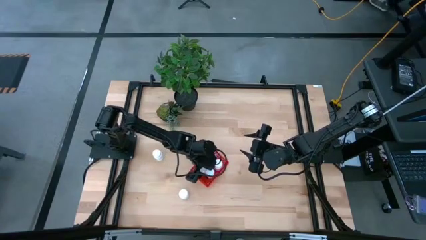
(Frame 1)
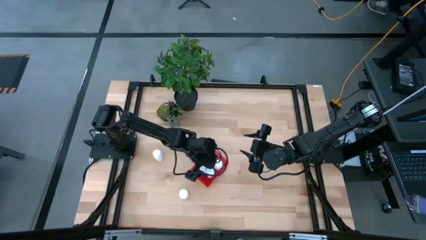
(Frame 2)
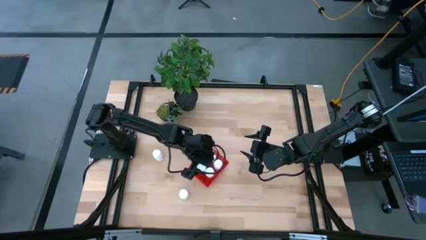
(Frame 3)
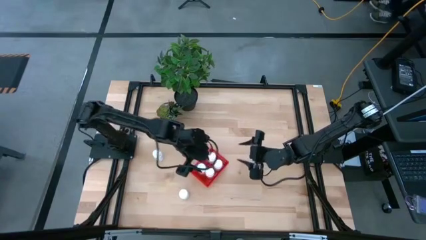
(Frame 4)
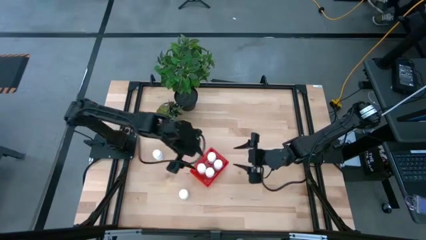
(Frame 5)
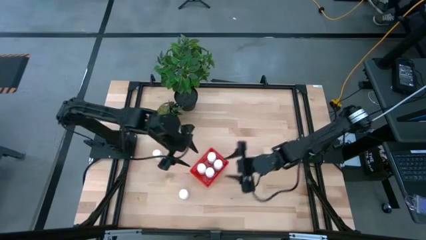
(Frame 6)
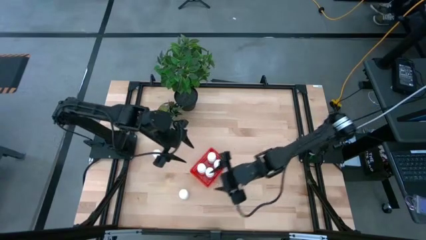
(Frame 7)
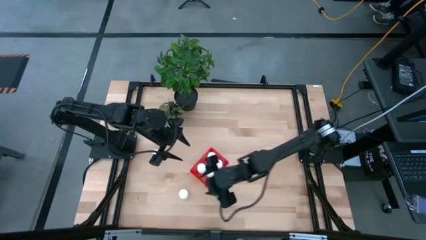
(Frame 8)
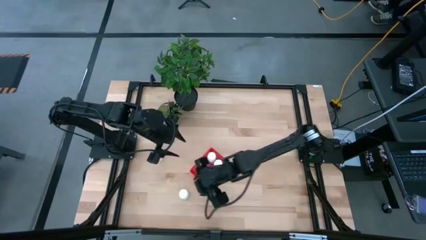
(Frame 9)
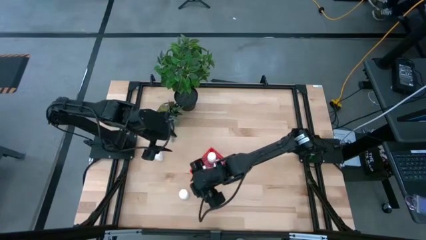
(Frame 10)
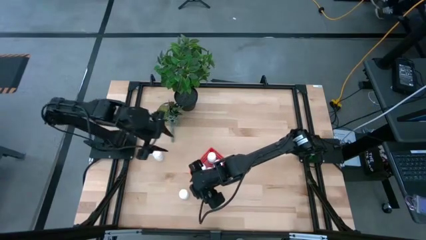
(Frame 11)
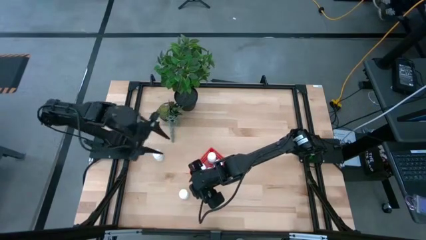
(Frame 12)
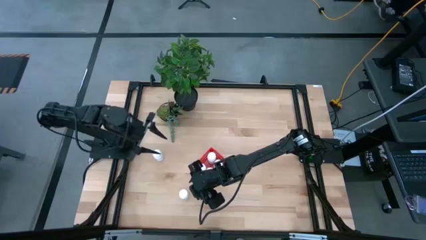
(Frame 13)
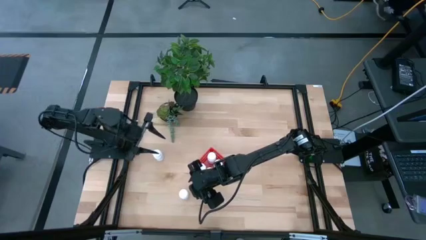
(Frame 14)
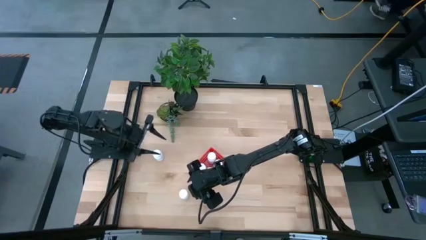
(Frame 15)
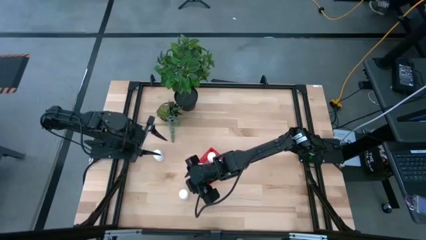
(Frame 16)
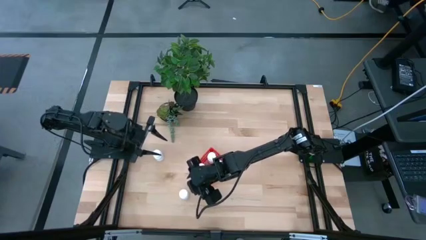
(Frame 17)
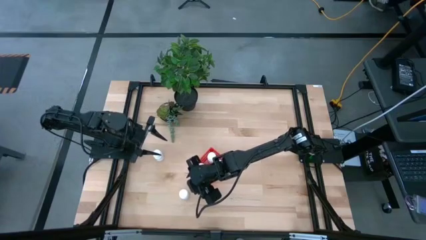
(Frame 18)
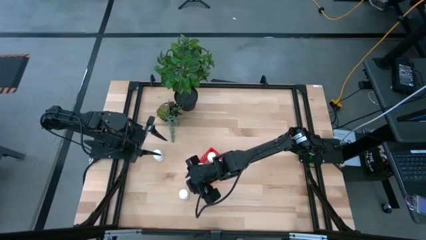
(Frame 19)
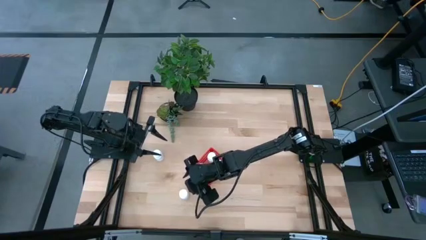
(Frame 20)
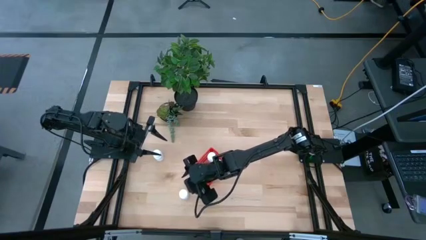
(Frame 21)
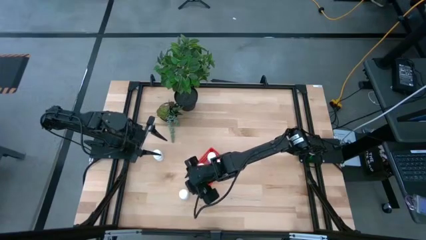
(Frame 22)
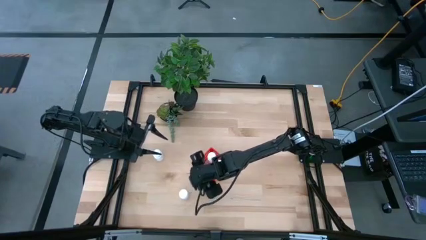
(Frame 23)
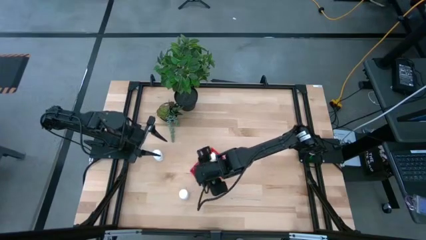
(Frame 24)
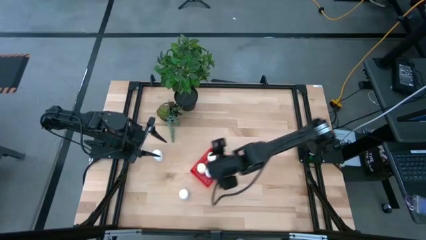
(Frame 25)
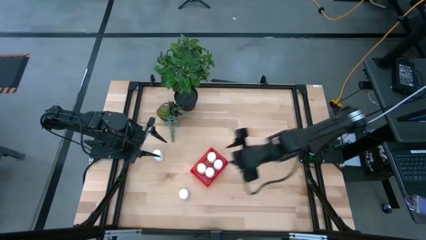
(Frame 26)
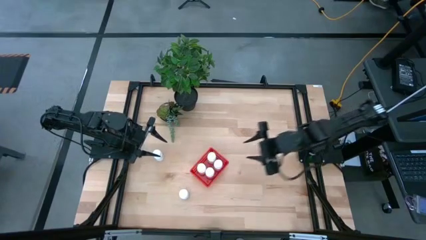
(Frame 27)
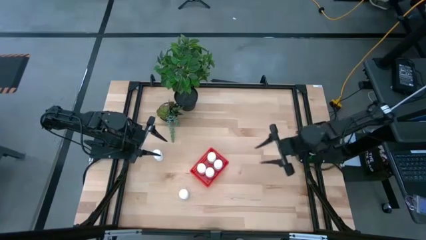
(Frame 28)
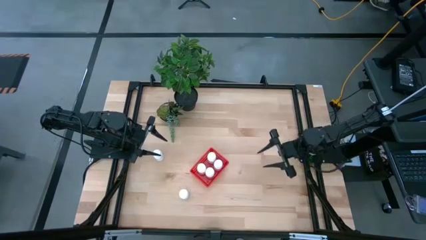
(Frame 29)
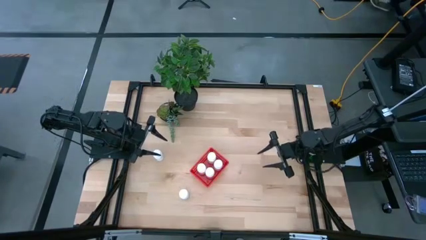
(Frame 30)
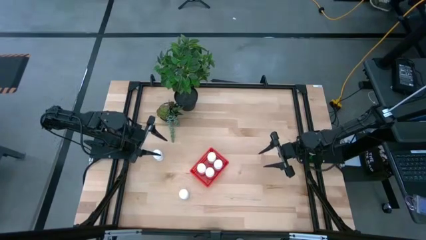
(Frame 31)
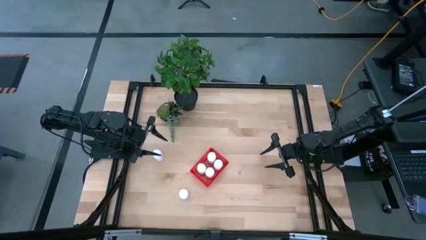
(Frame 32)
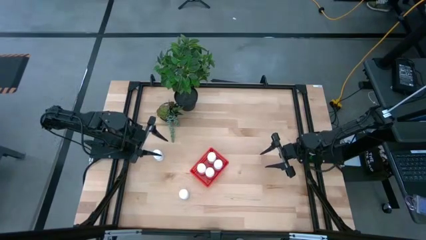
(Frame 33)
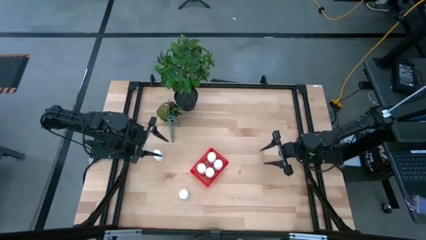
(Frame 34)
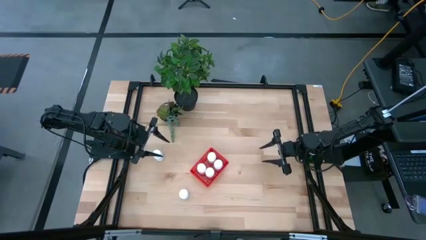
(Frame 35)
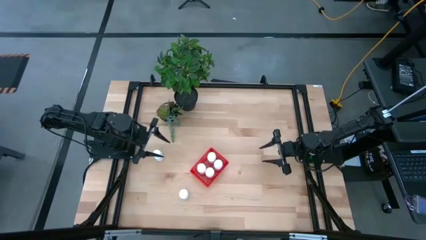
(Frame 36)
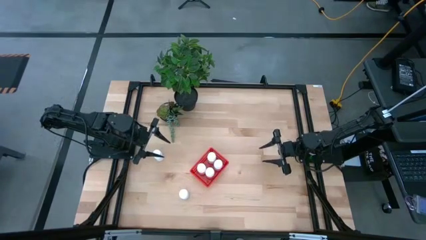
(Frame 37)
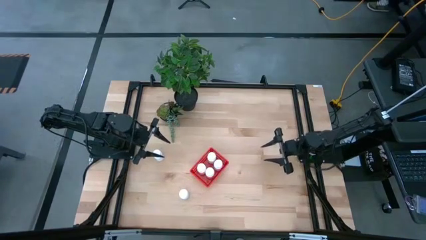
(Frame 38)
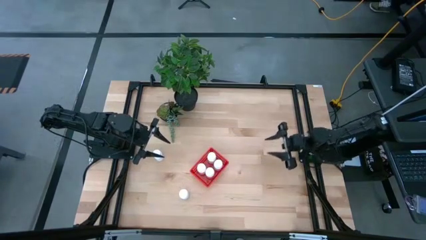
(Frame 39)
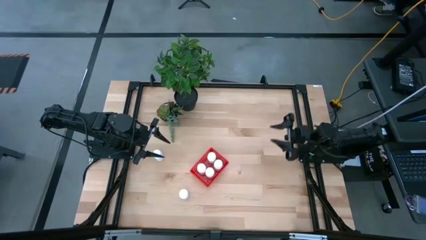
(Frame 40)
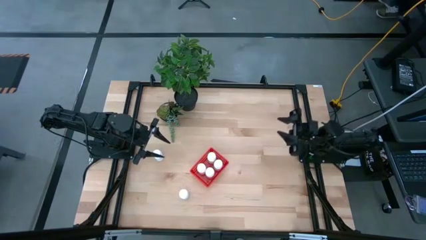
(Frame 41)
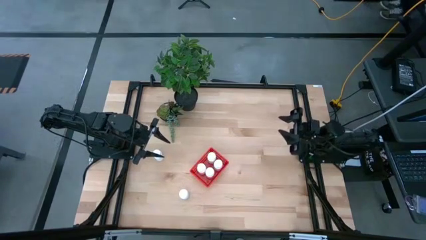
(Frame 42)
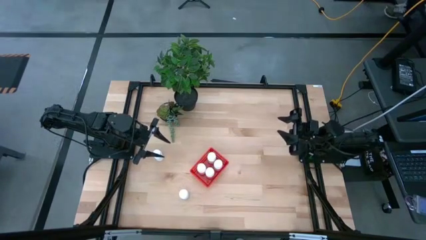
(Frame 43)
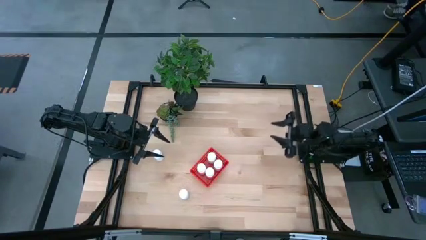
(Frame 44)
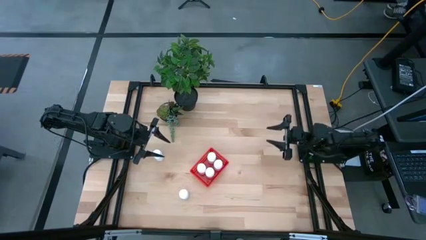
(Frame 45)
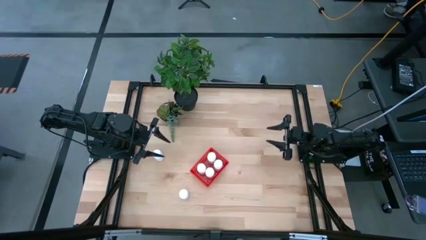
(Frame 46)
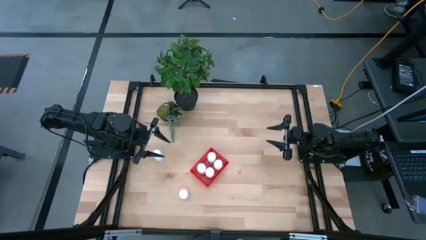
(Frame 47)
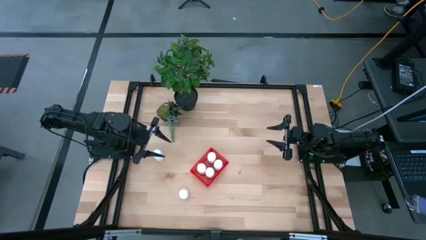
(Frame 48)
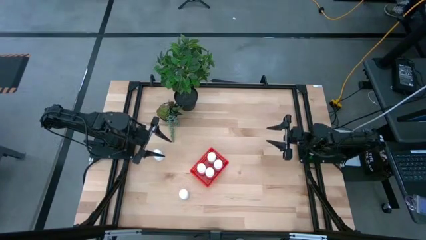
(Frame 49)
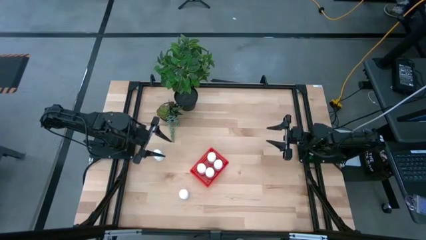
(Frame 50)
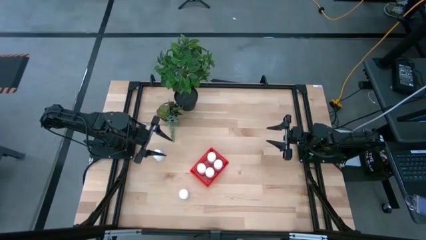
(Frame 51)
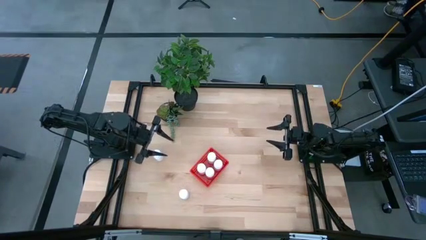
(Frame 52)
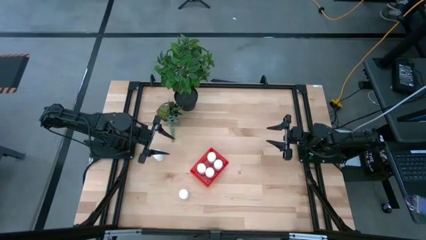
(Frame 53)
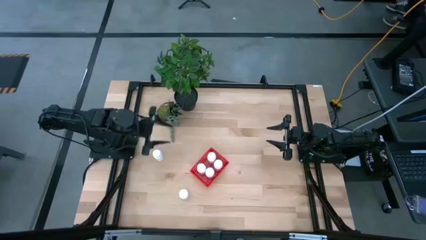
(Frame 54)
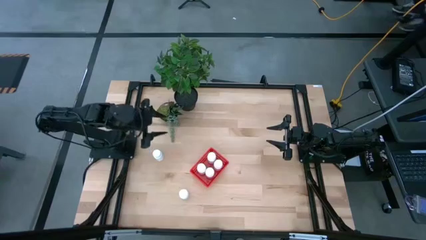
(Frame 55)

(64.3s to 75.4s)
Task: Pick and place pill bottles into a basket
Put the top white medicine bottle into the red bin

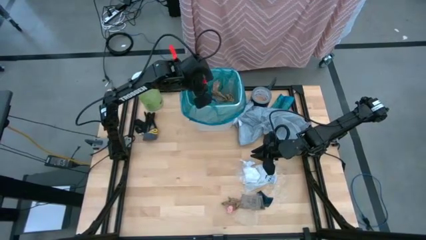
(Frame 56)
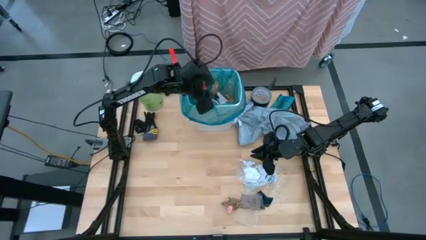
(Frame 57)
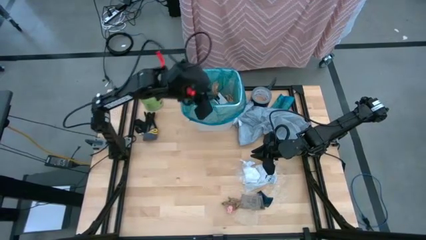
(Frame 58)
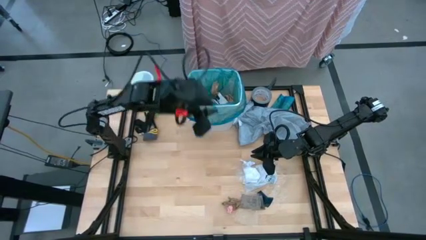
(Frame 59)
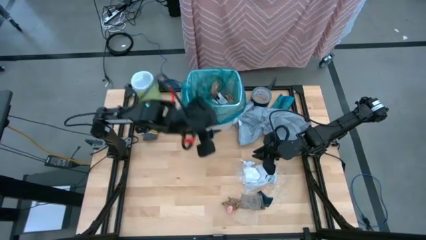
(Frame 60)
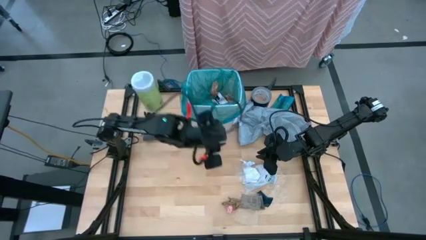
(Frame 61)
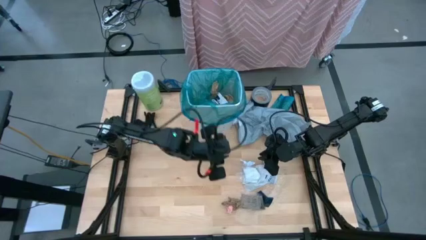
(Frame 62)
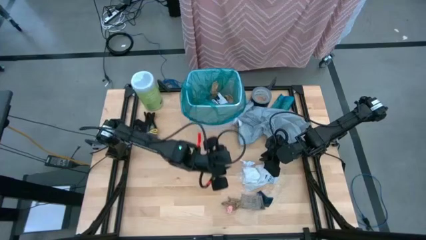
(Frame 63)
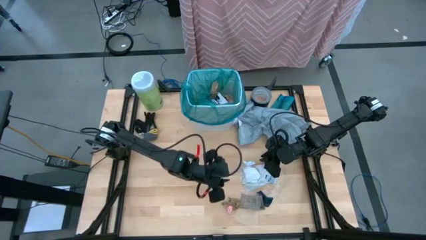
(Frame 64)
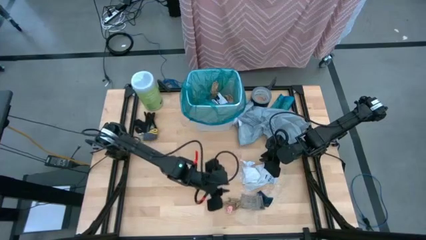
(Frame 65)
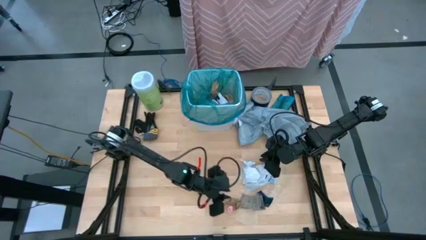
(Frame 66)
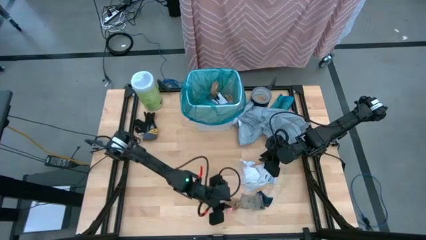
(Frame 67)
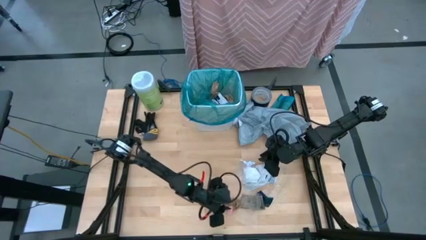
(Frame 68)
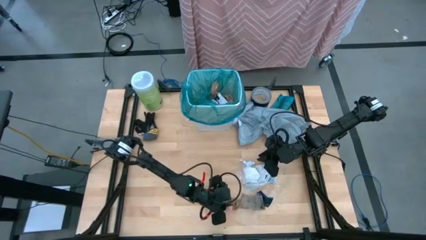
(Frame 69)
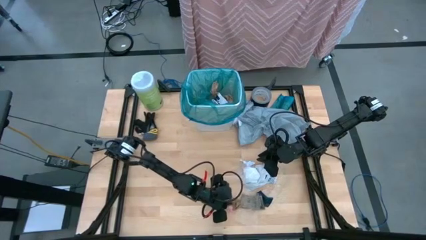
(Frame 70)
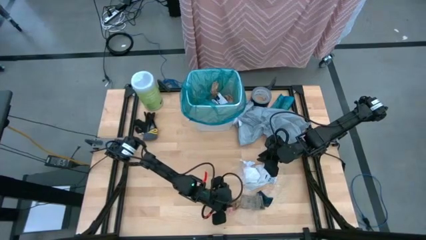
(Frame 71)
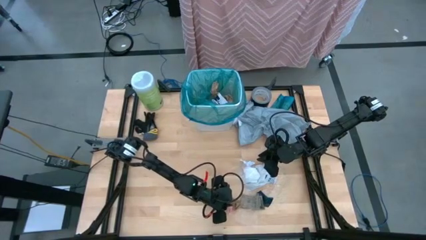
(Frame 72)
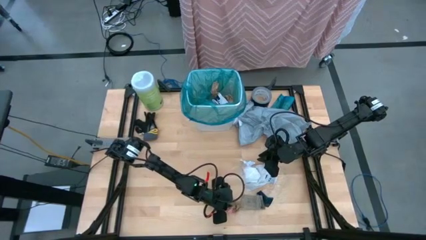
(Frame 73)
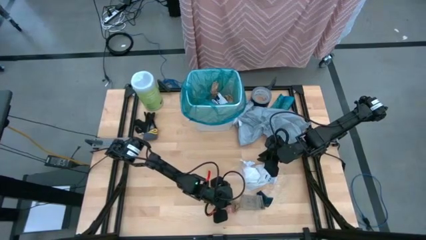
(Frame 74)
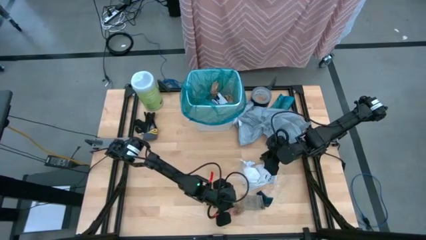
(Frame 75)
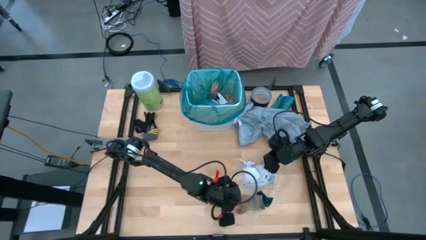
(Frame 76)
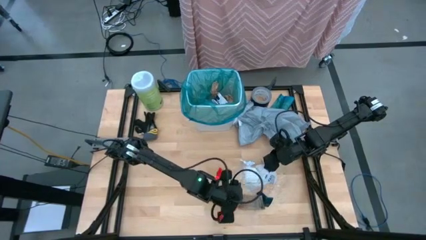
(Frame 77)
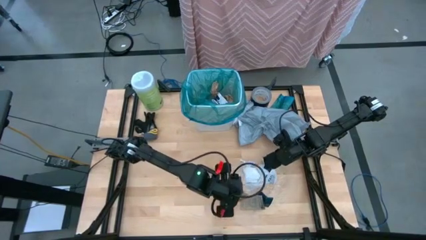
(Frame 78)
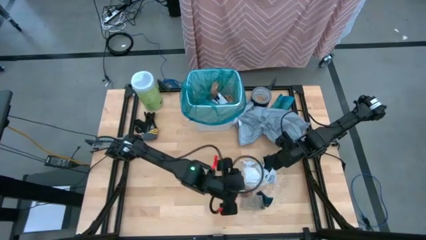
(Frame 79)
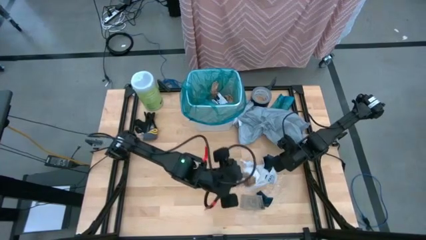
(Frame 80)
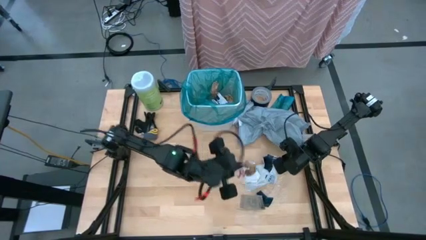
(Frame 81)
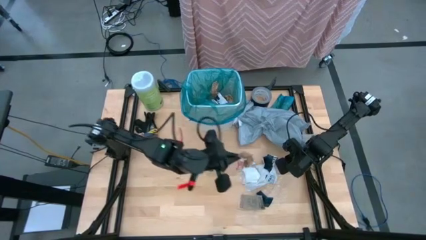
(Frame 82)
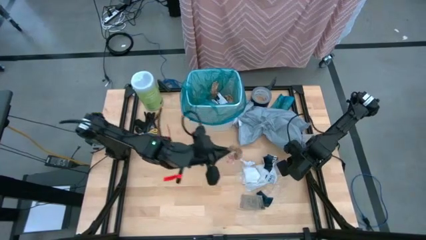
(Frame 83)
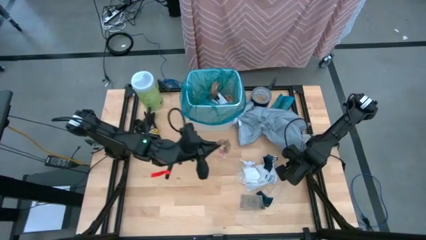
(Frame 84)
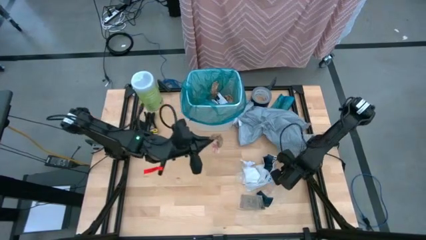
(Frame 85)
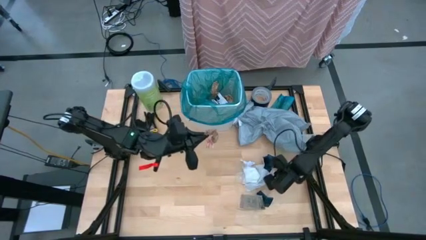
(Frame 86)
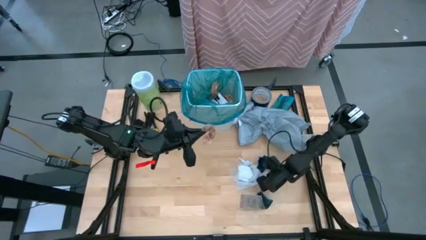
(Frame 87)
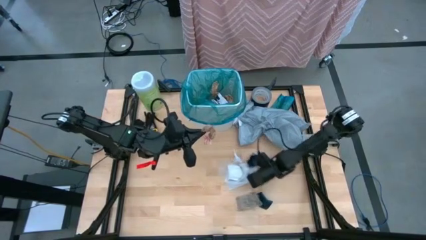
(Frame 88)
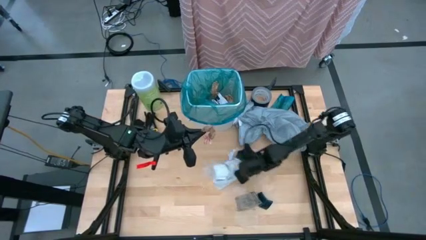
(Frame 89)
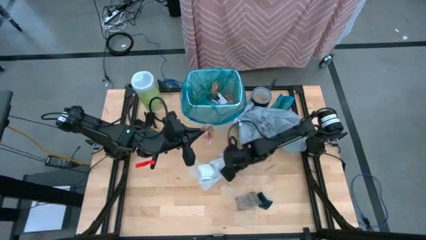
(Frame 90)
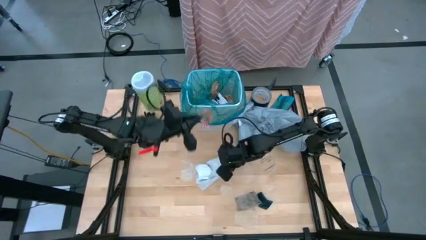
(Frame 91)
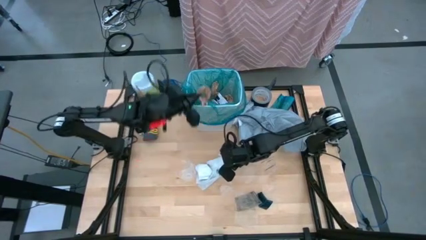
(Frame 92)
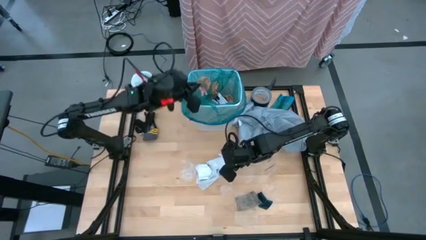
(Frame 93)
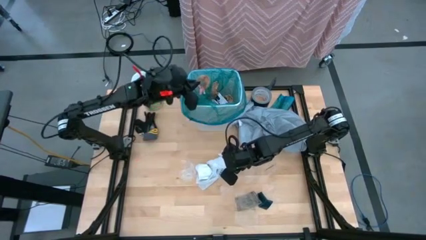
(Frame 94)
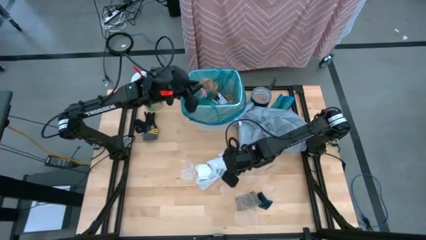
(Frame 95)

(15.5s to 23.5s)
Task: place trash/remove bag and relplace
Put the brown napkin into the trash bin
